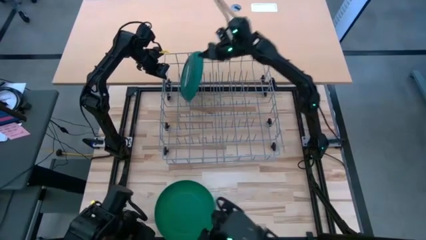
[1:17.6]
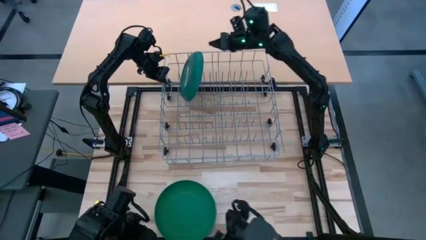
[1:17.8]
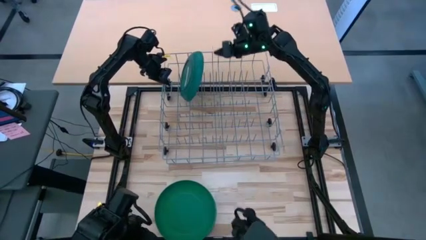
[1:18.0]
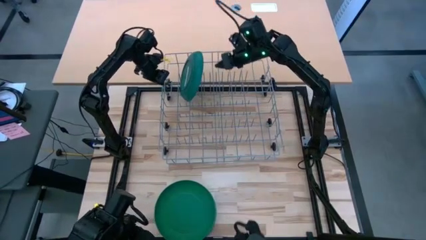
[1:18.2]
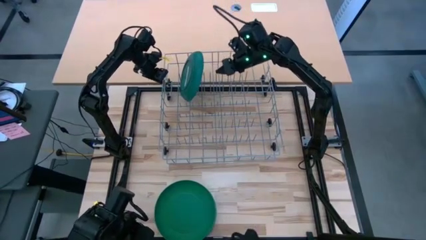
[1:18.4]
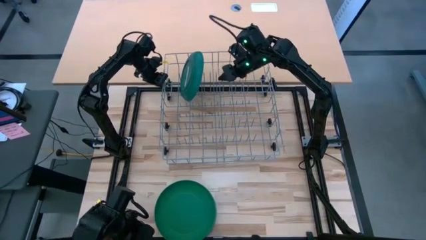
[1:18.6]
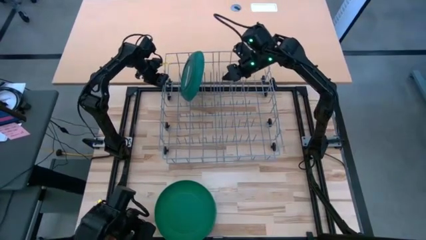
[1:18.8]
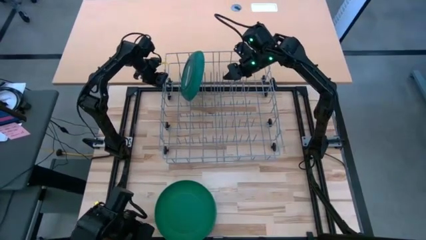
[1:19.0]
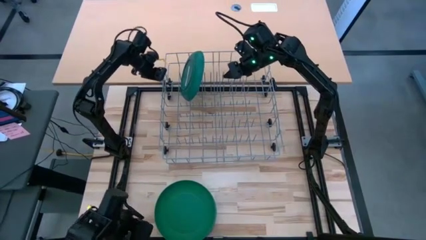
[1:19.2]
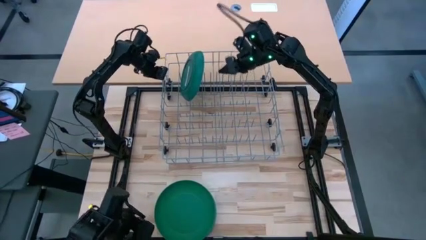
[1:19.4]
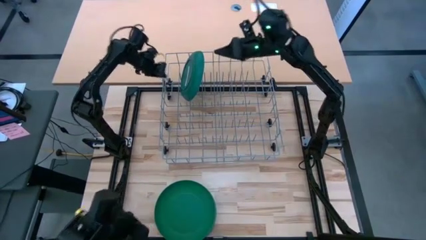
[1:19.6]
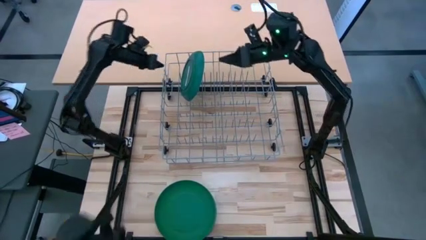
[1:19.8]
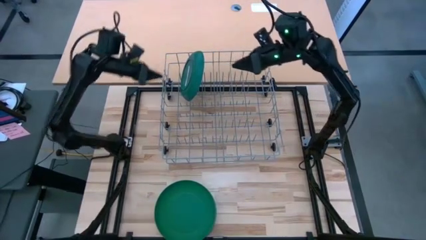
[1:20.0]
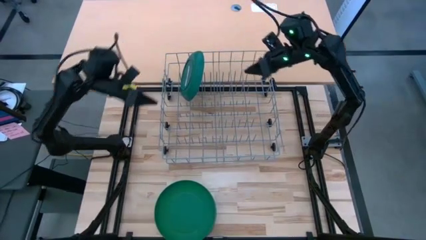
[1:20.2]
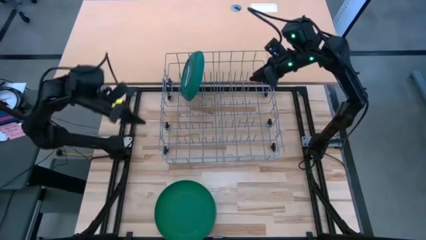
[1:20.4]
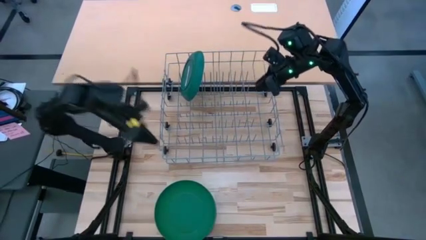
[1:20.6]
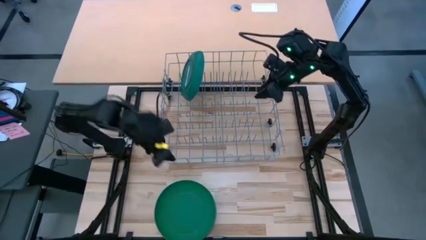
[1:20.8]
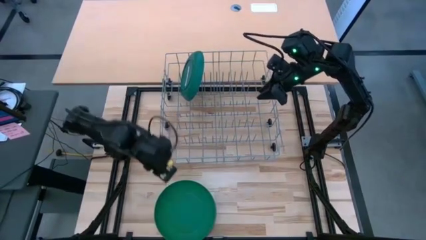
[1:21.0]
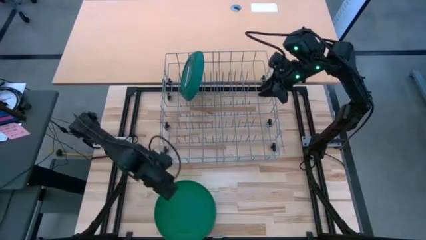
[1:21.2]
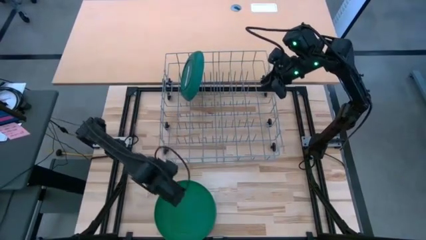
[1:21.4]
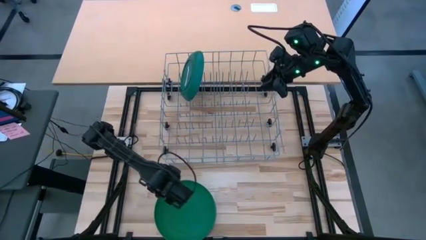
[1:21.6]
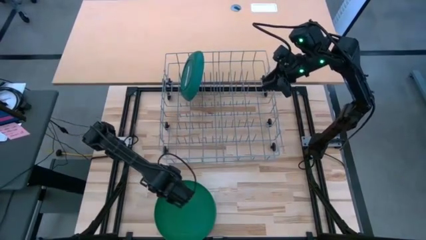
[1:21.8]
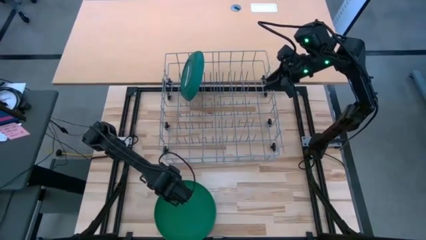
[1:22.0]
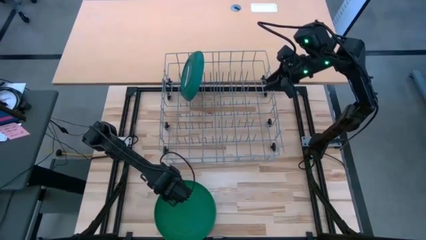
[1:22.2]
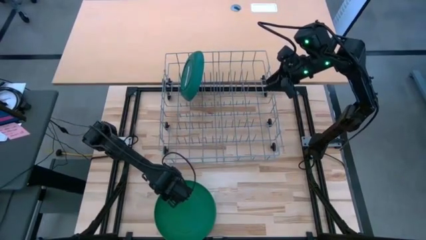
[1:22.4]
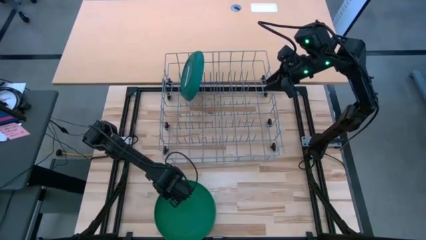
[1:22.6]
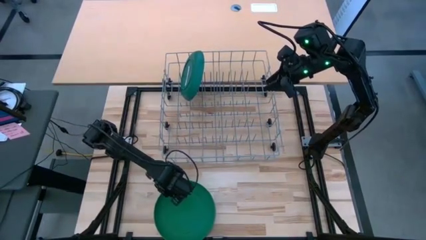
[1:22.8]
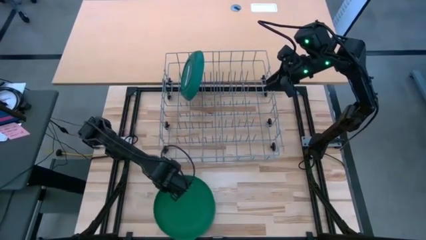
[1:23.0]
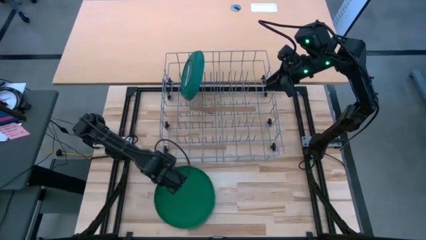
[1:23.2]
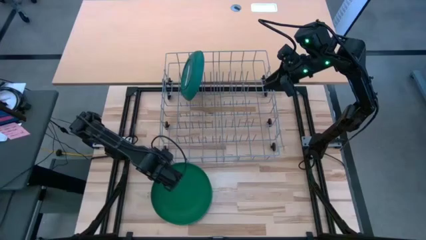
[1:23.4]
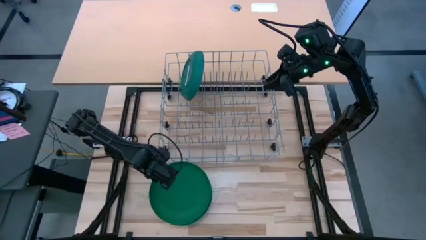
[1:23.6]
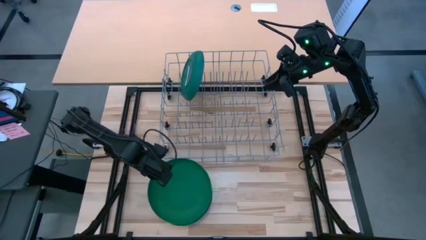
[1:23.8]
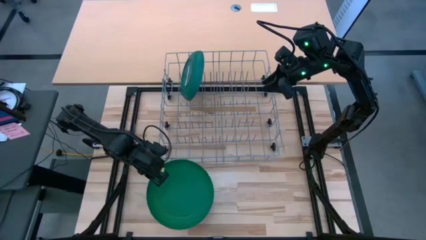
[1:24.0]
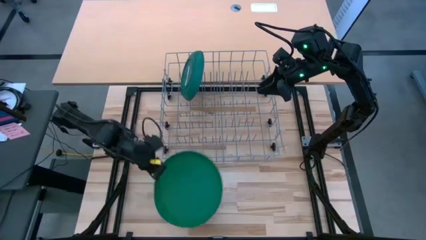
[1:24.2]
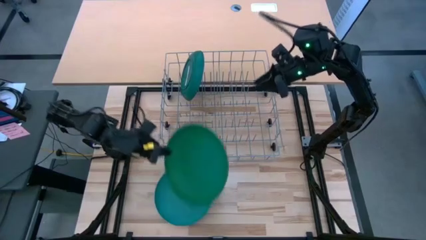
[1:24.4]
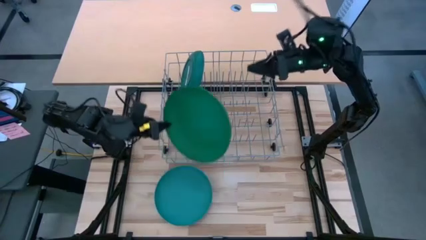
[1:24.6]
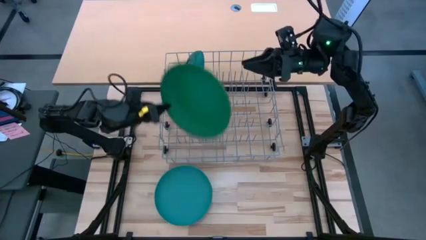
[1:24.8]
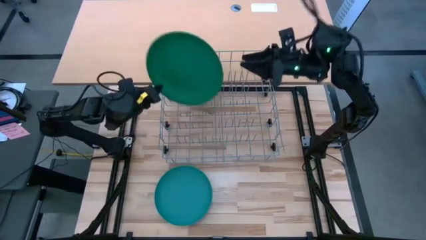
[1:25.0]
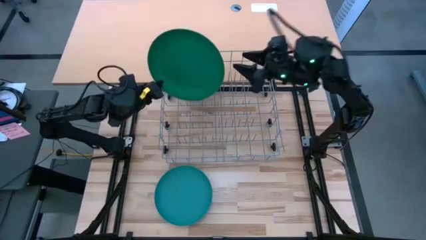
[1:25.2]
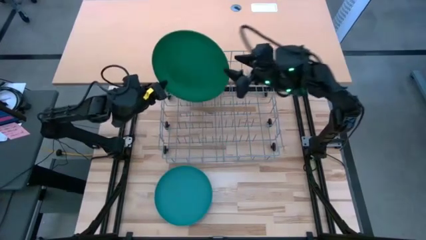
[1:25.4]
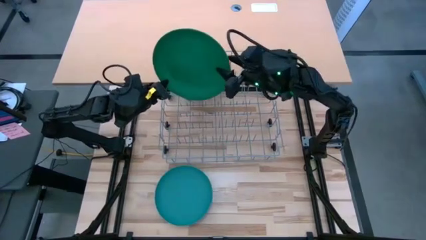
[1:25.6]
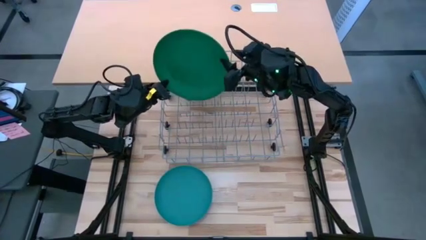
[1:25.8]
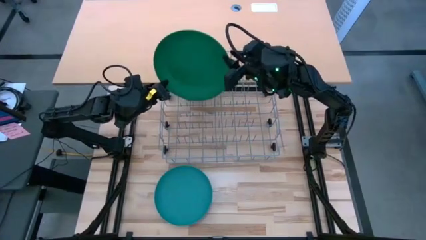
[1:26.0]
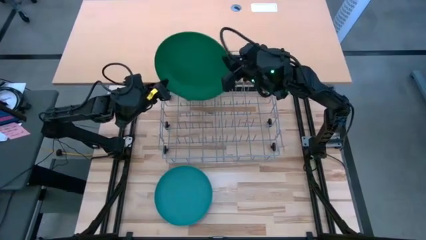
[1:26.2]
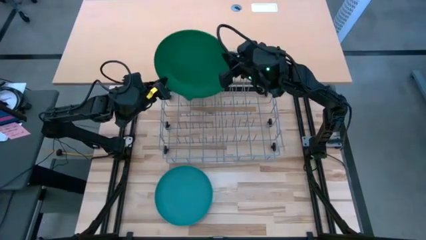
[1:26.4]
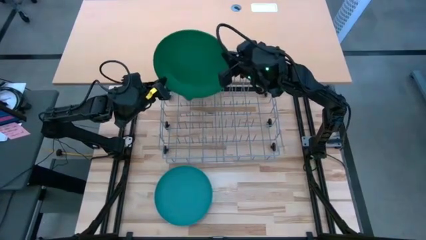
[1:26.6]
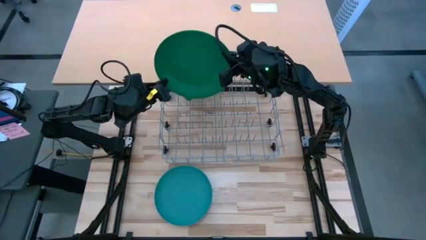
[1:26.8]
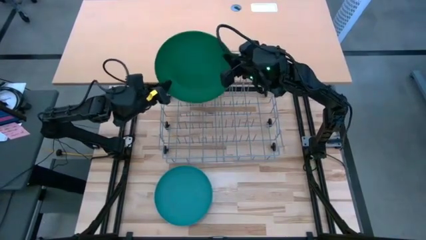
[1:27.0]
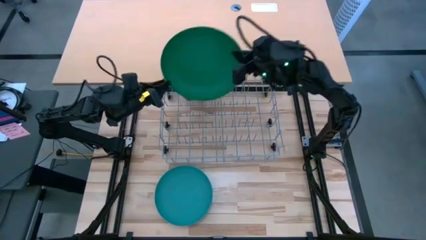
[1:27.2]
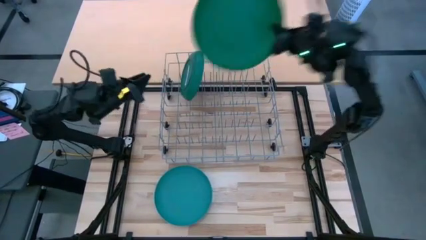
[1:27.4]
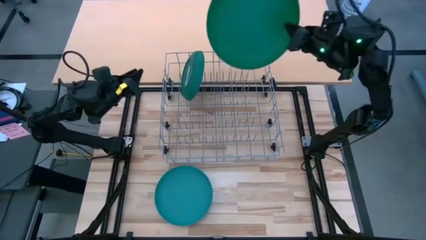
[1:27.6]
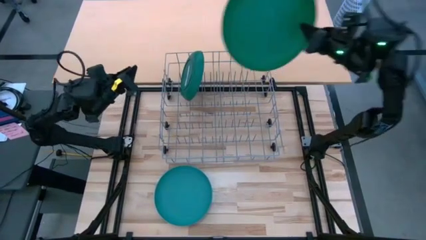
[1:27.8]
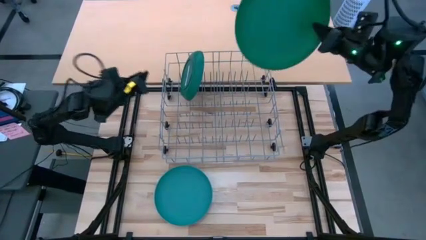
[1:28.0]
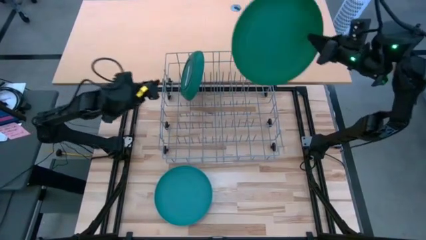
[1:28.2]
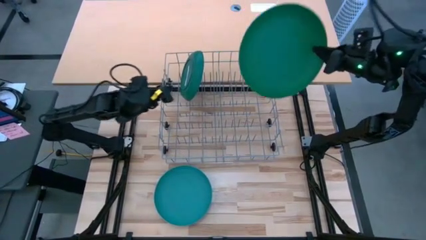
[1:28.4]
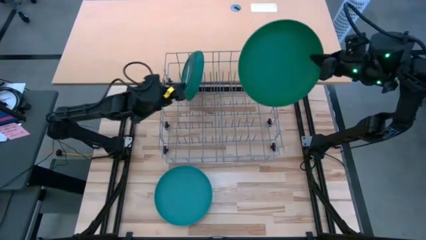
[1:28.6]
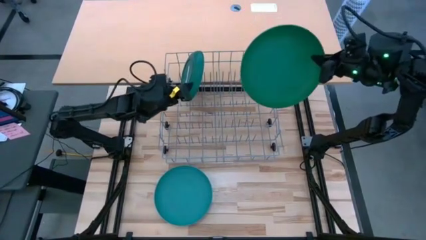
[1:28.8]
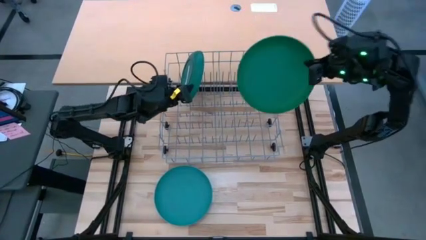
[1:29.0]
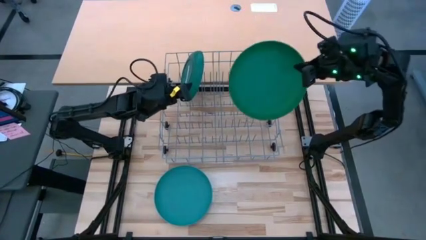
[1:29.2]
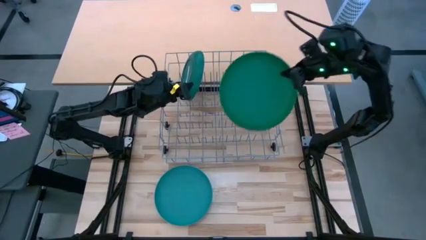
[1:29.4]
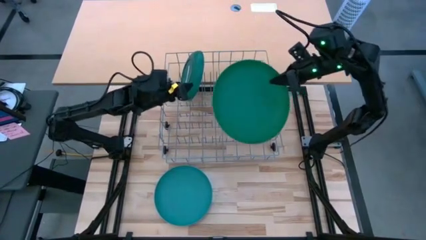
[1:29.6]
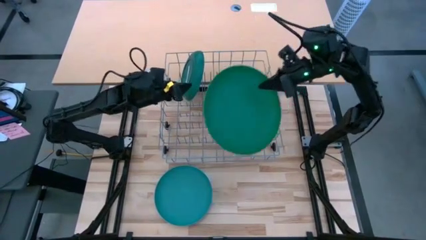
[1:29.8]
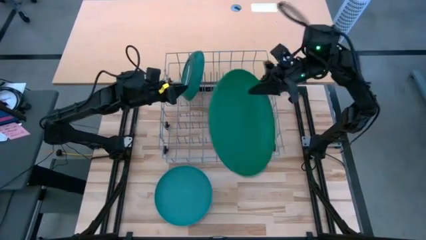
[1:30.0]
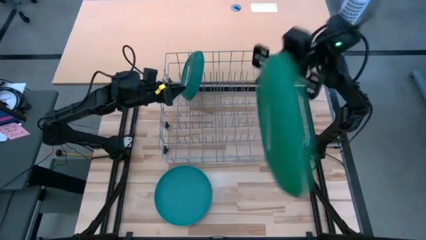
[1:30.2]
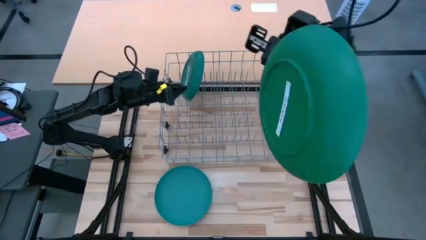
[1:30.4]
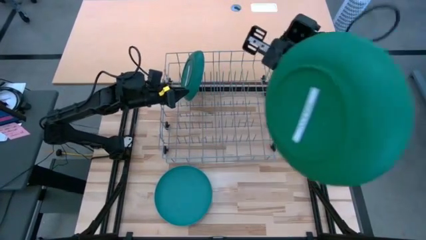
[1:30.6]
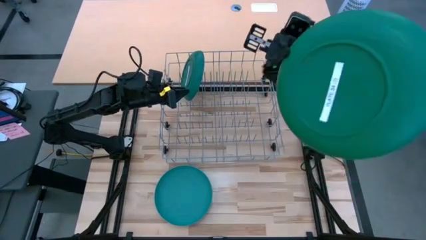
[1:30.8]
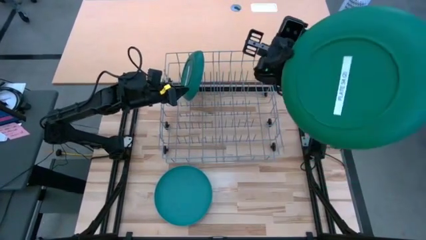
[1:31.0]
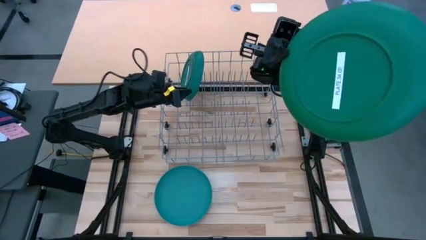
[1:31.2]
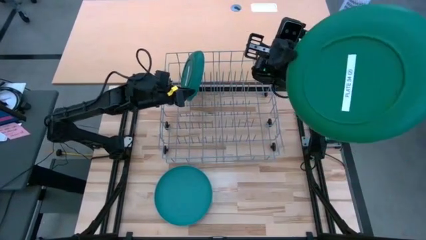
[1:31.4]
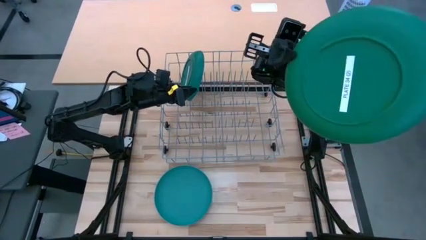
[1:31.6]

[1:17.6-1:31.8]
Task: Sort dishes
Put the green plate in the dish rack

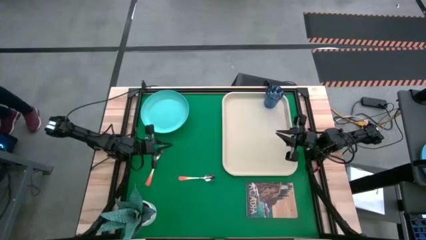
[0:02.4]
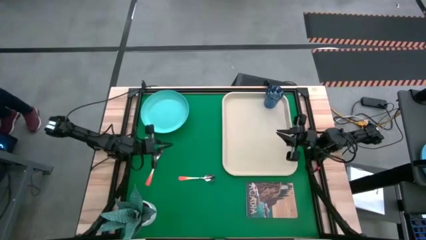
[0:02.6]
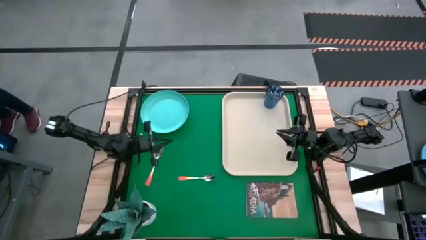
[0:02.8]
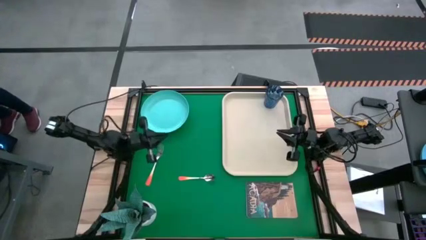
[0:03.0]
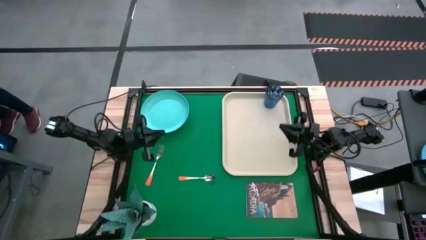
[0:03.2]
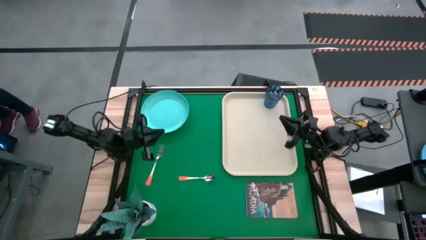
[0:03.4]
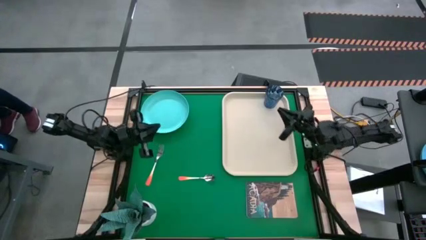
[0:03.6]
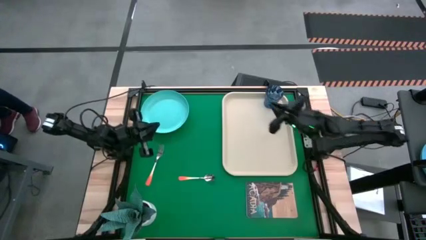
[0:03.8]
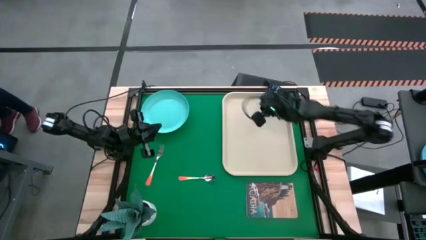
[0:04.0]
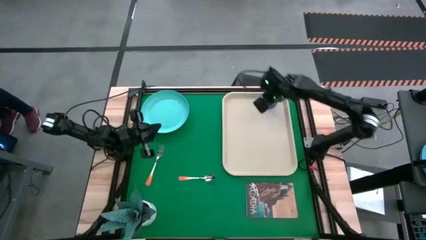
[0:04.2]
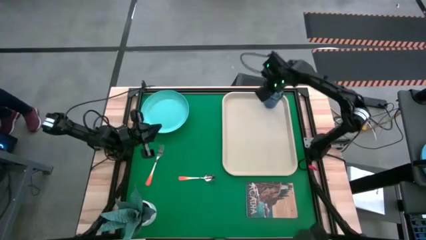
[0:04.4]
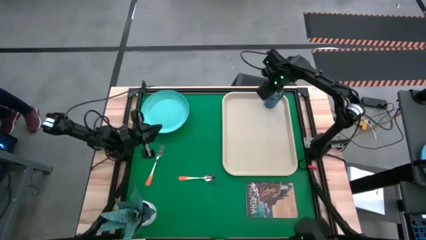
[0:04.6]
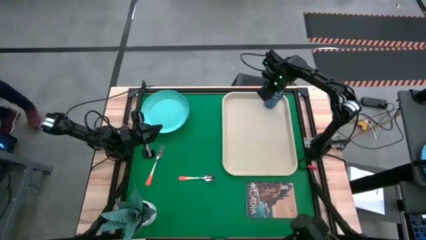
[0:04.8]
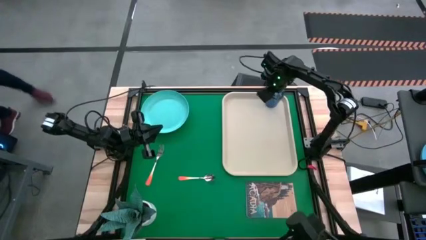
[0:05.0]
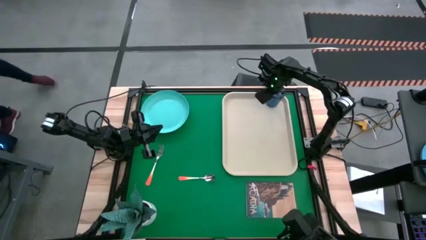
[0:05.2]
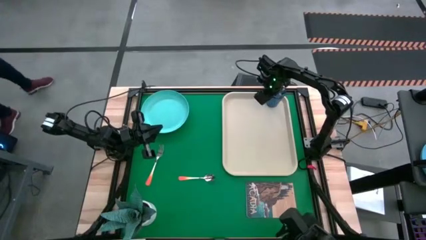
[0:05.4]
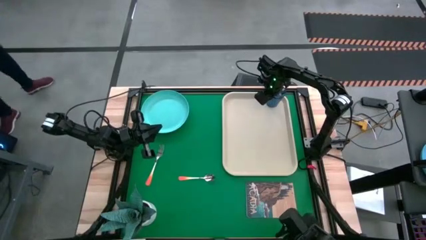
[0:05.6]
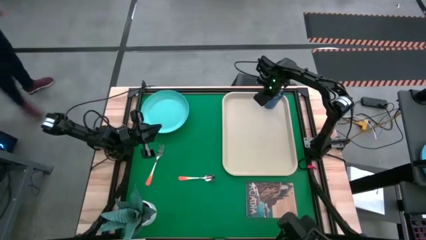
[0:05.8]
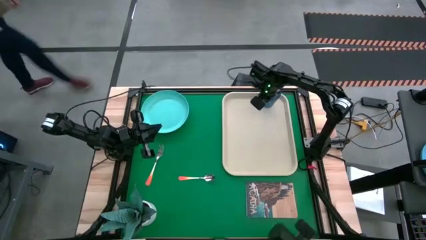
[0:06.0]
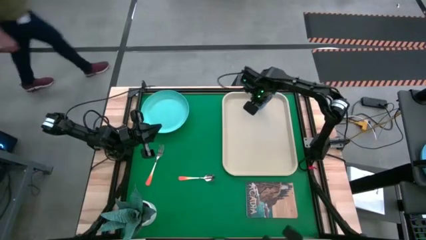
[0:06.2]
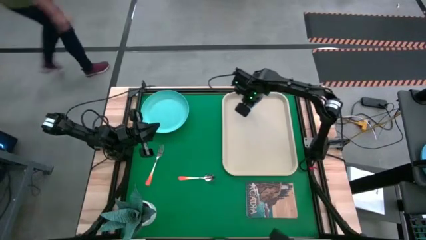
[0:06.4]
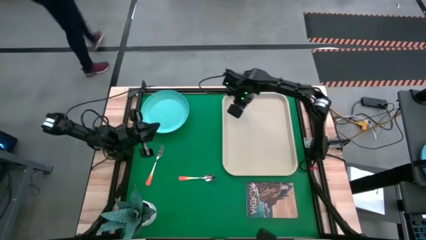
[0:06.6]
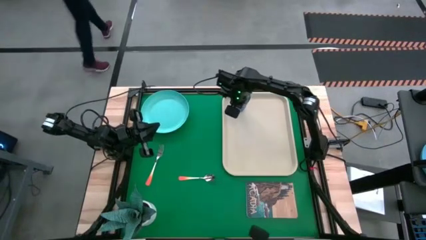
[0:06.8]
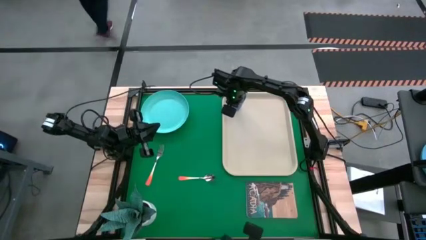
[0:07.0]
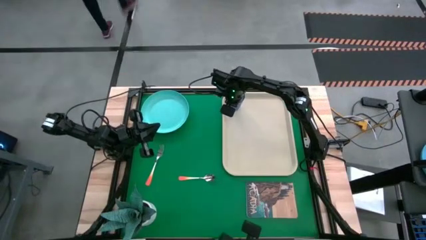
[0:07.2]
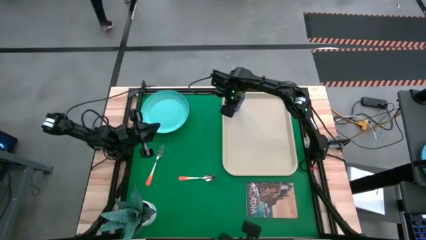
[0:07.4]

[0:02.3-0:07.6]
Task: Pick and place plate/cup/fork/spoon on tray
Move the blue glass on the left side of the white serving tray
